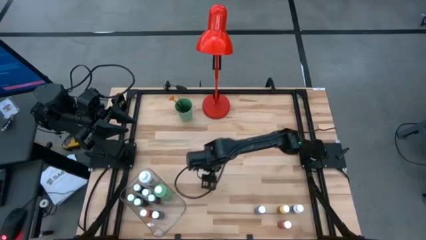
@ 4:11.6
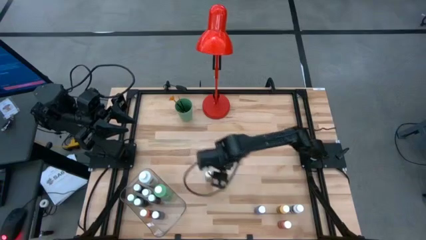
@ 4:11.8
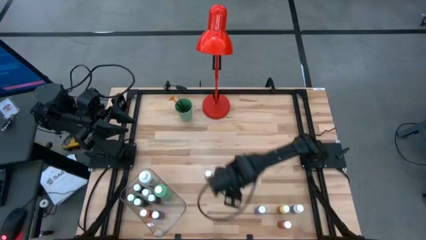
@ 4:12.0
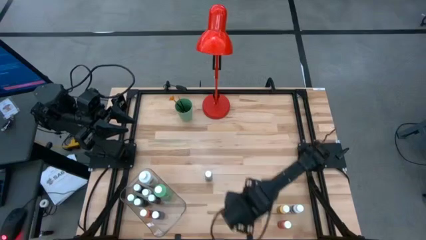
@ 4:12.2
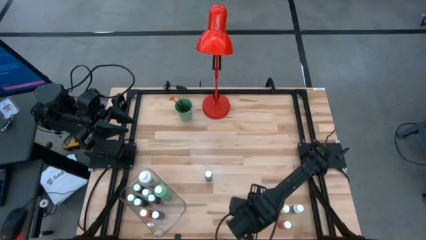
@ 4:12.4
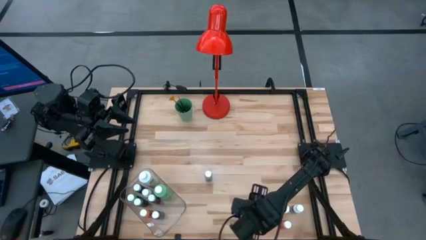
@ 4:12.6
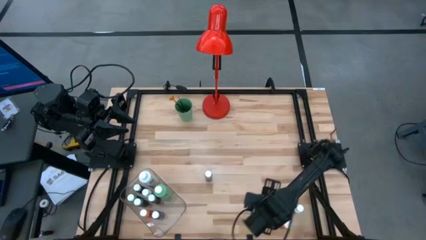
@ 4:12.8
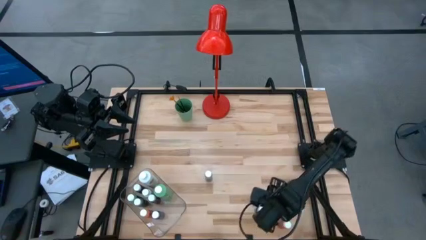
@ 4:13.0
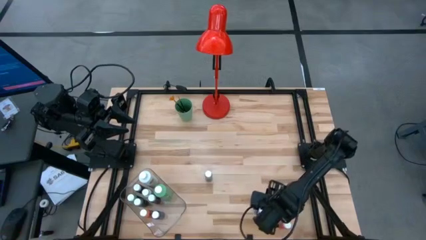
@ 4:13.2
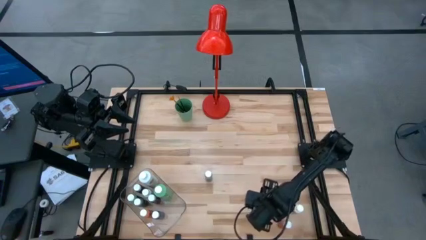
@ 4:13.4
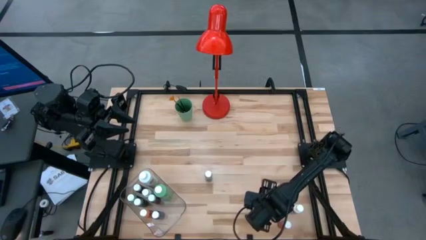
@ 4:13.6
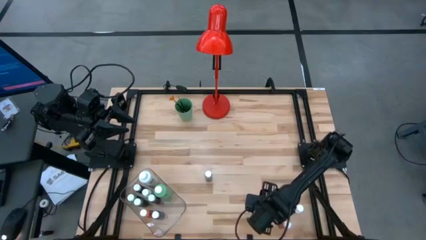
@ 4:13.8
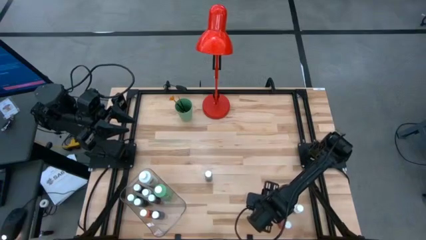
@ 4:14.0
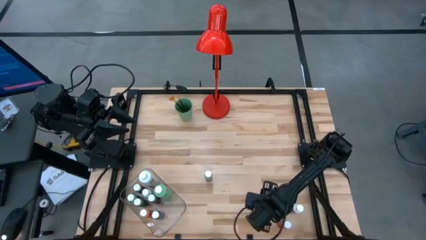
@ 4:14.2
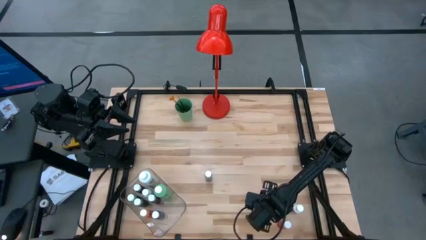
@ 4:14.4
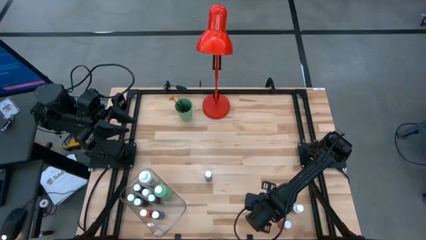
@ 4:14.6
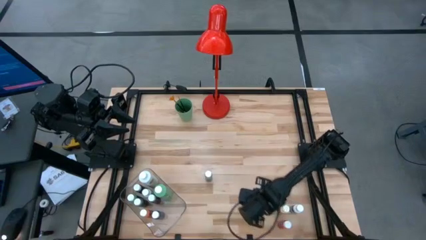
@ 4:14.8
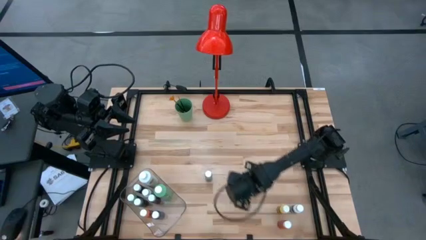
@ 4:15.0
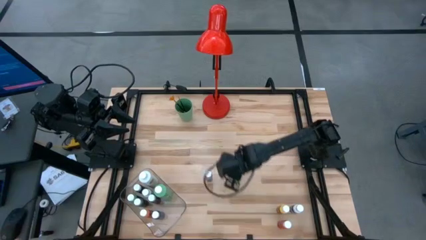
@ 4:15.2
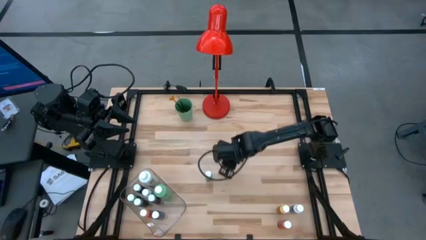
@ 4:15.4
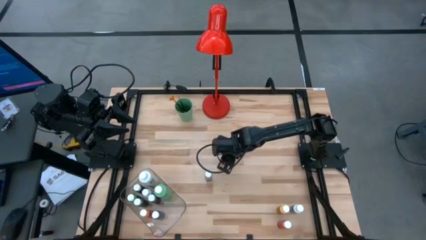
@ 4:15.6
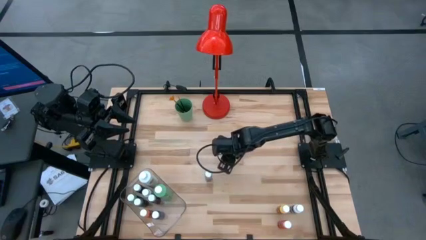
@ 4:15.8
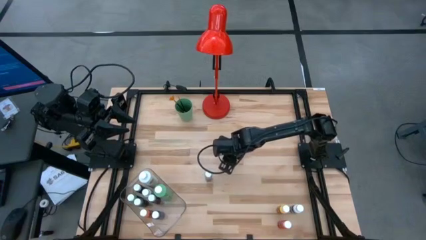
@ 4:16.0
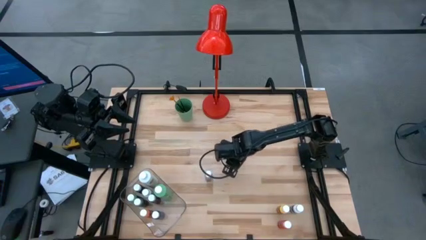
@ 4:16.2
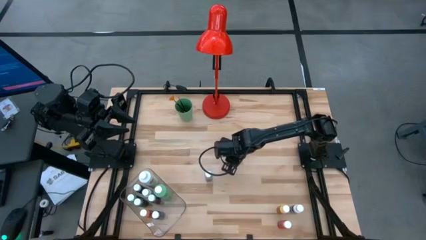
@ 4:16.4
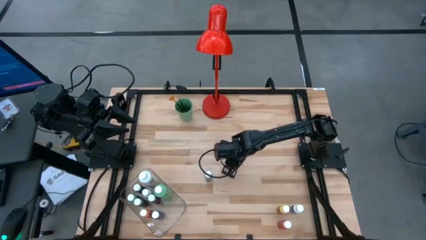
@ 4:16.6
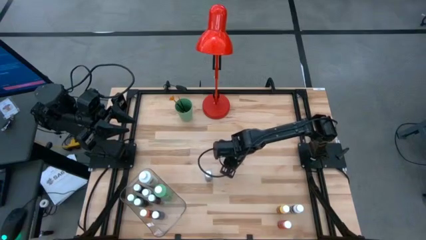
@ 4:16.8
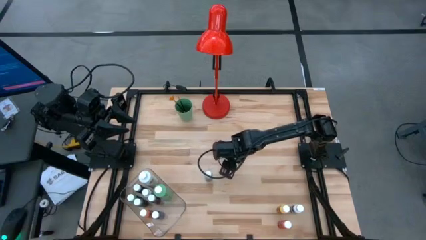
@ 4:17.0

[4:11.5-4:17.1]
Task: Pick & Place Paint Supplies
Move the violet coloring bottle to the center of the table

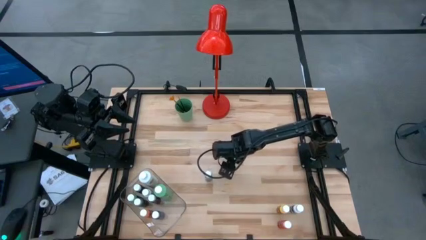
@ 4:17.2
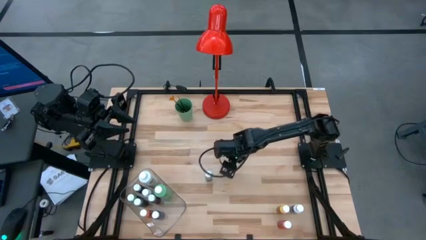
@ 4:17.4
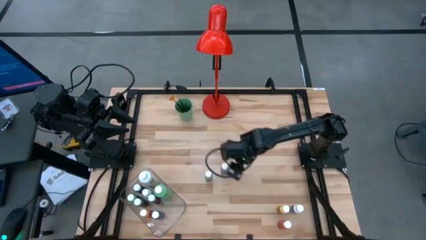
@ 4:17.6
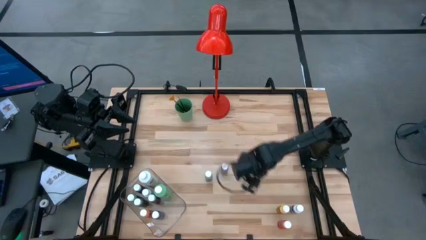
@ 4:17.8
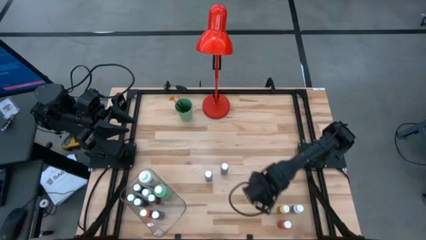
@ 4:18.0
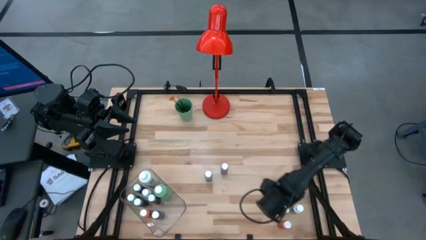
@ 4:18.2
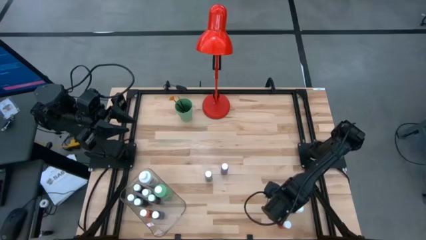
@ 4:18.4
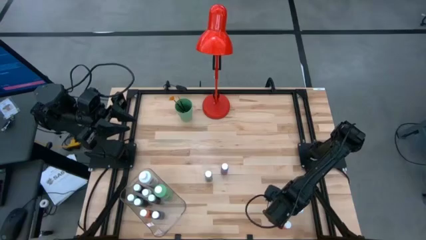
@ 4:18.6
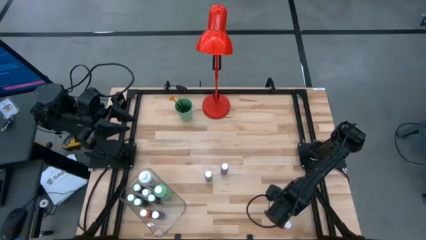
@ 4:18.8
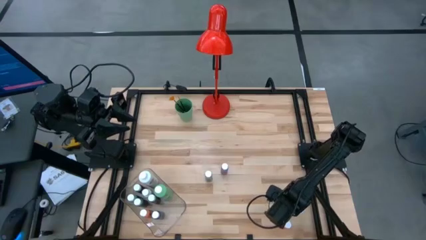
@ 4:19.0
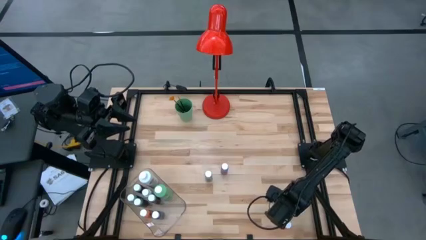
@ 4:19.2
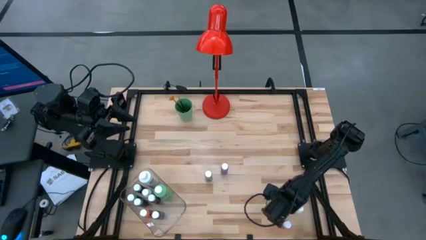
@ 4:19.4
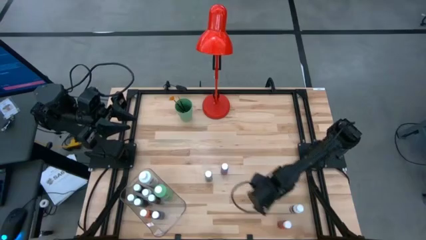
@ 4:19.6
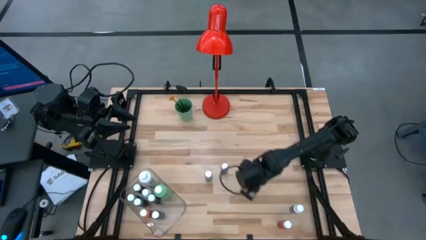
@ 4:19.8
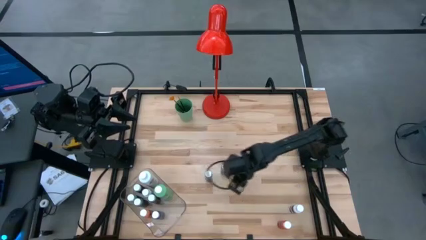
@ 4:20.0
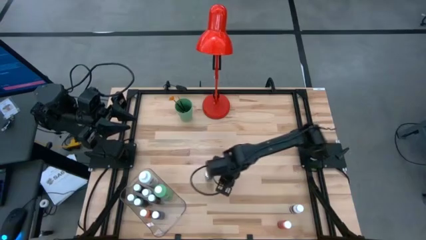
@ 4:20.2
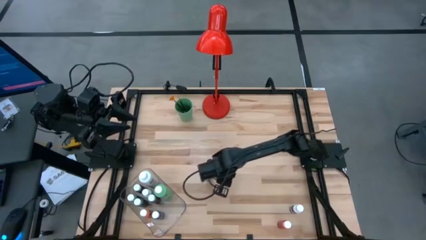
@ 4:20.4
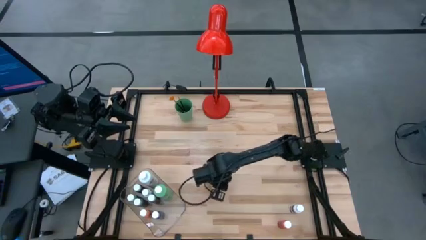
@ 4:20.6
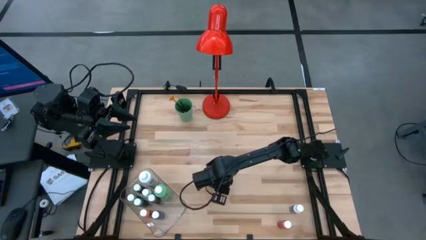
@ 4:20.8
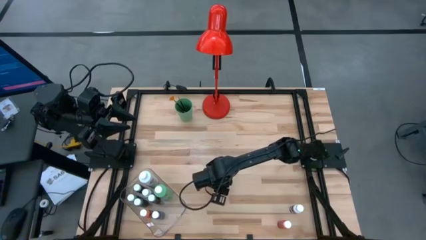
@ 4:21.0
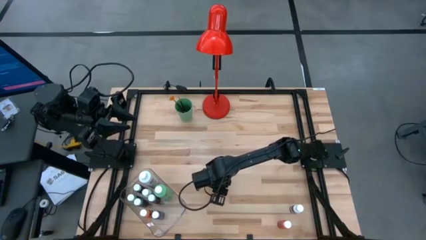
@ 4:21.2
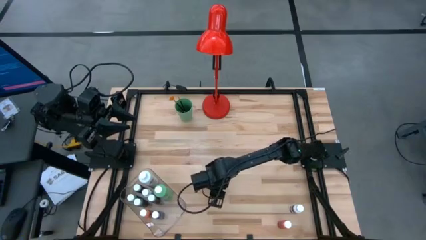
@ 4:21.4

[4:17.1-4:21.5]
Move the yellow coloring bottle to the center of the table

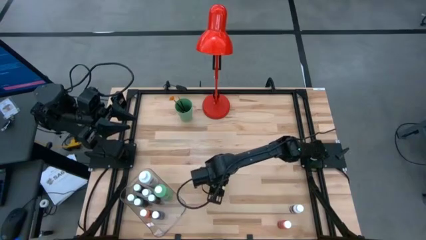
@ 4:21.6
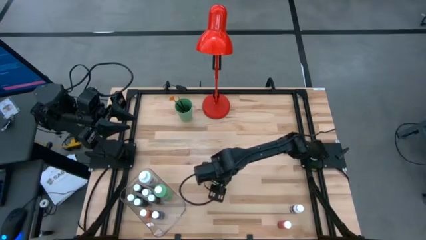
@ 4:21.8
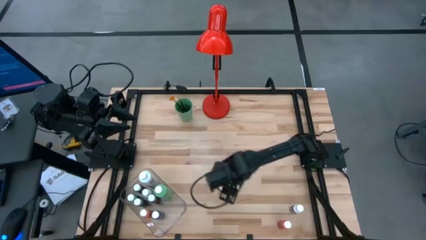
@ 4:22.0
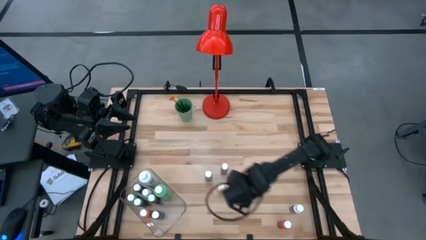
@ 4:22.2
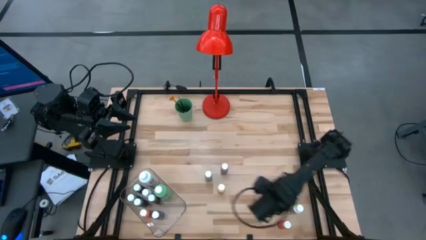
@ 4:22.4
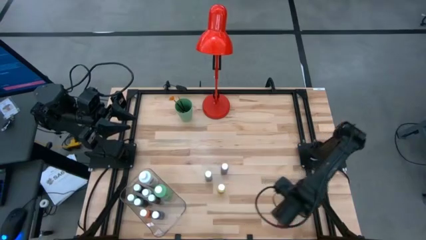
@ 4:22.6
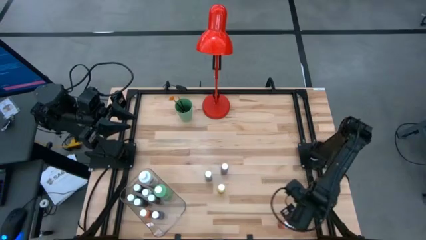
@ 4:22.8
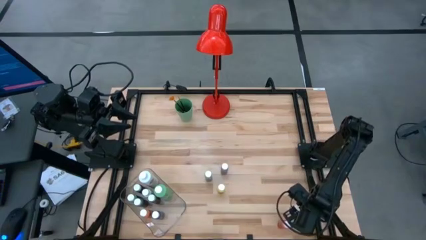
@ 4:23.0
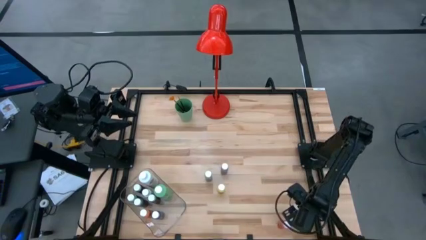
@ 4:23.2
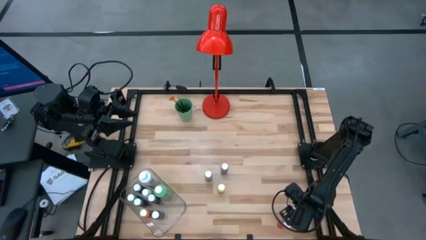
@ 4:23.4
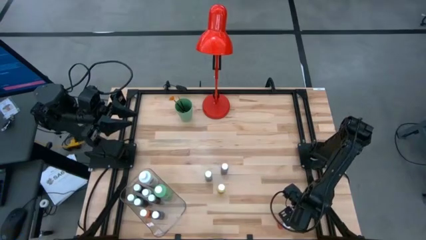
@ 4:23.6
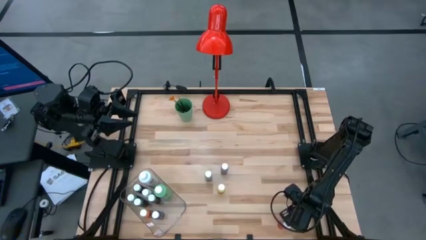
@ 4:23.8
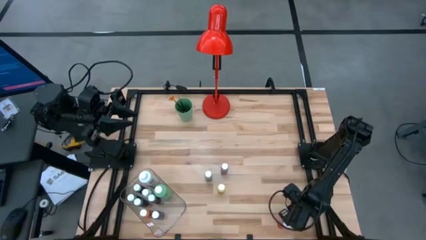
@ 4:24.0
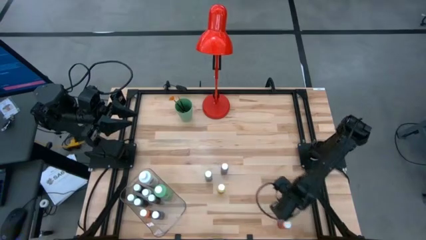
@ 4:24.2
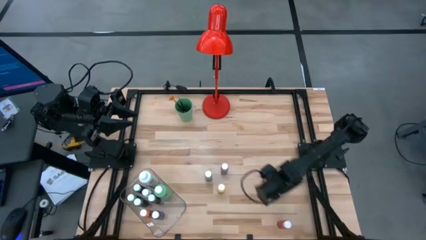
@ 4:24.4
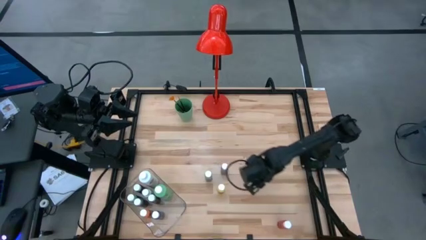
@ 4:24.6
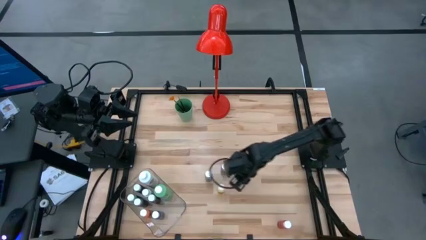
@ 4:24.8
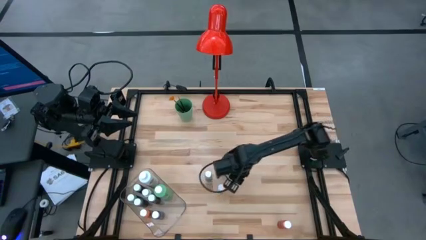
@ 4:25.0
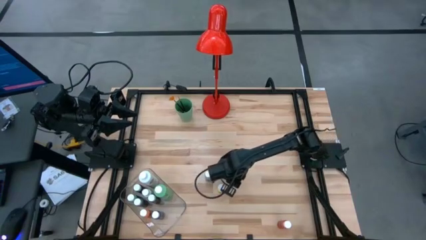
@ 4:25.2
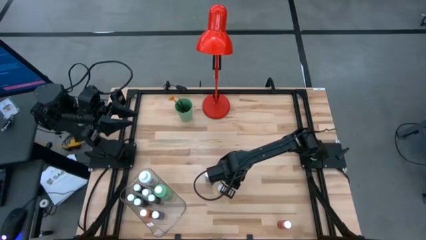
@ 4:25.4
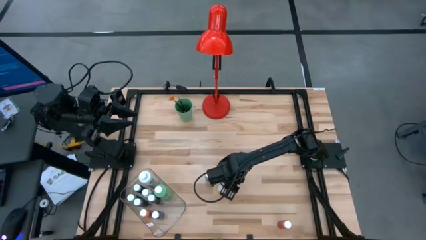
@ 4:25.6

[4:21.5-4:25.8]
Move the white coloring bottle to the center of the table
